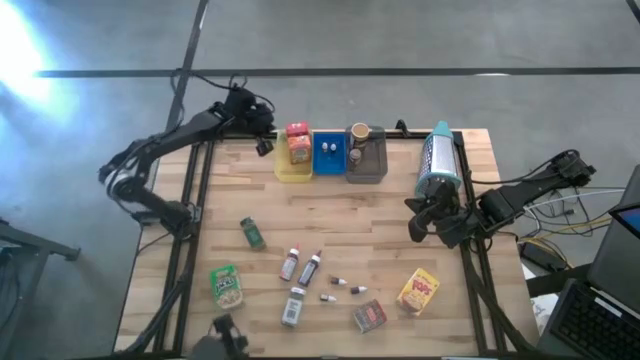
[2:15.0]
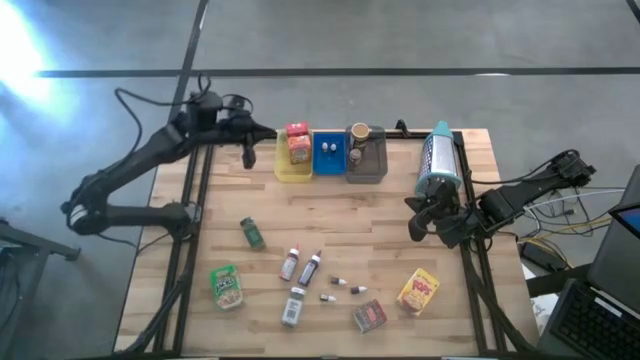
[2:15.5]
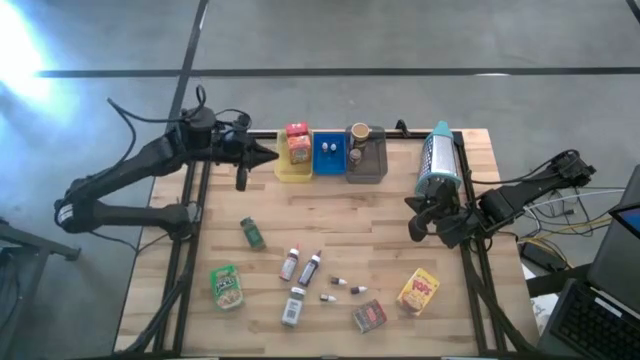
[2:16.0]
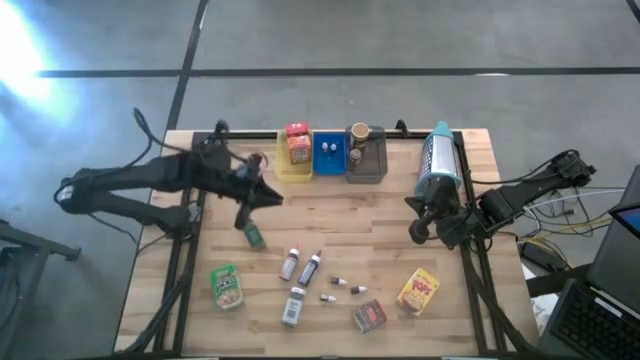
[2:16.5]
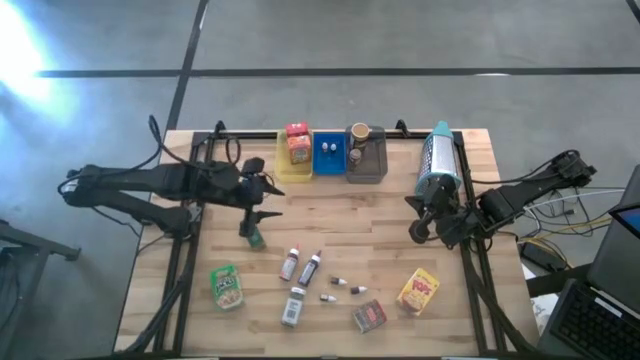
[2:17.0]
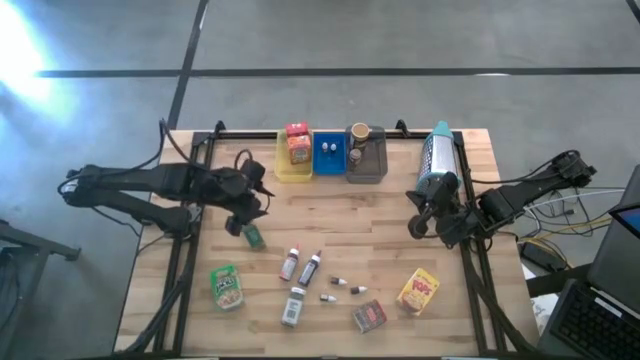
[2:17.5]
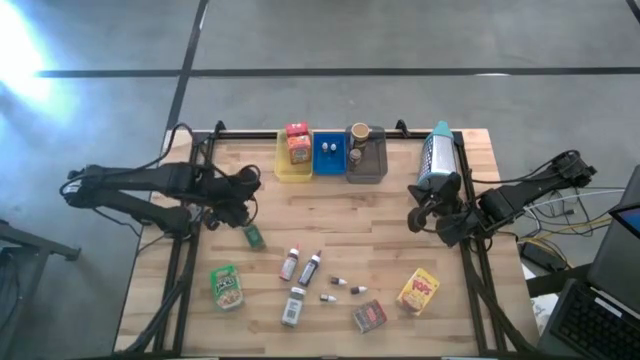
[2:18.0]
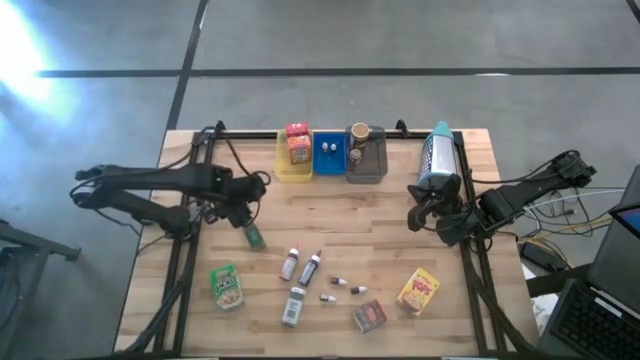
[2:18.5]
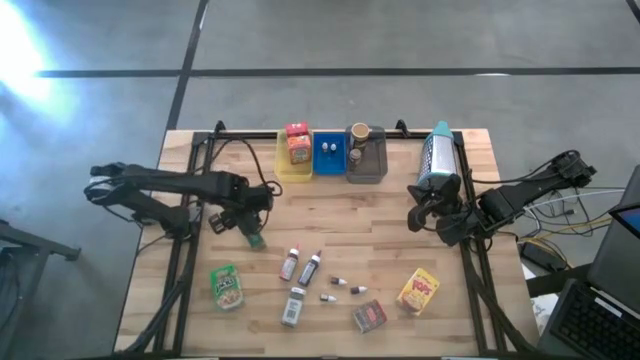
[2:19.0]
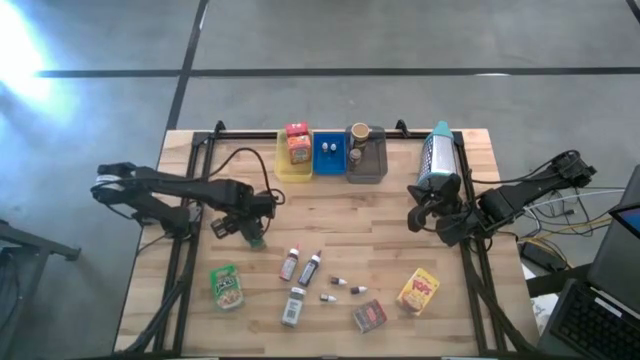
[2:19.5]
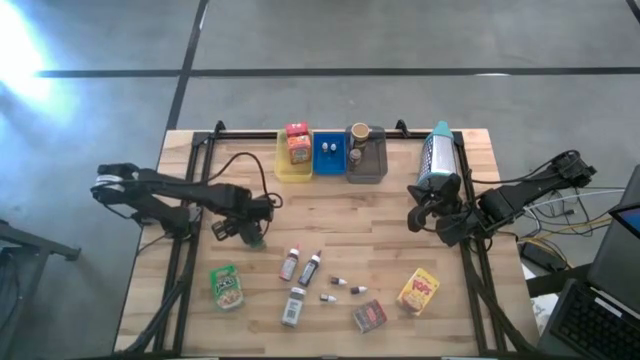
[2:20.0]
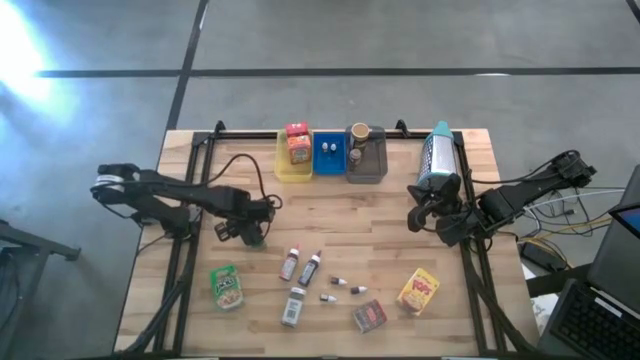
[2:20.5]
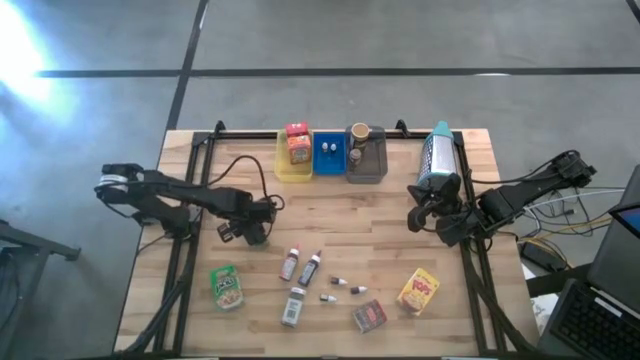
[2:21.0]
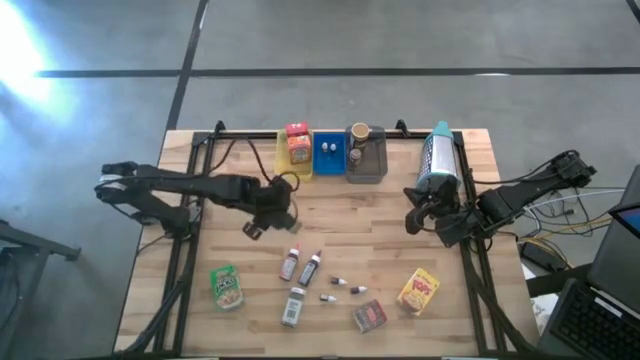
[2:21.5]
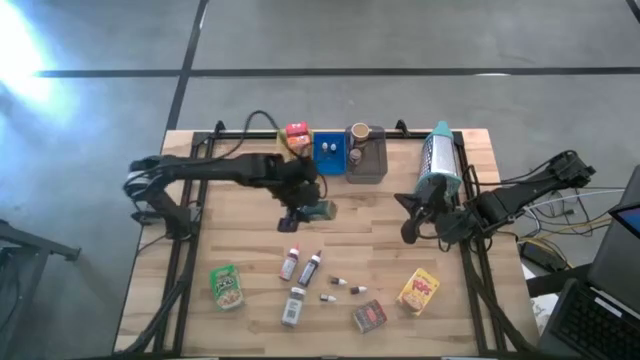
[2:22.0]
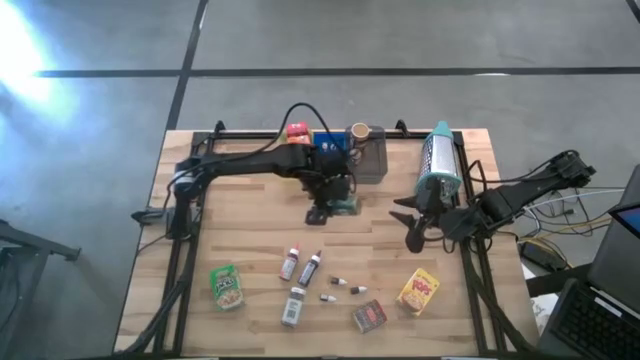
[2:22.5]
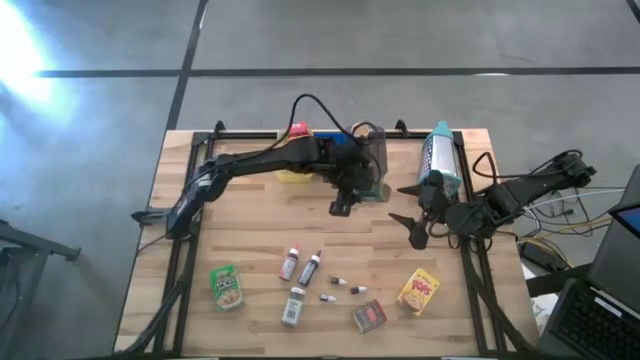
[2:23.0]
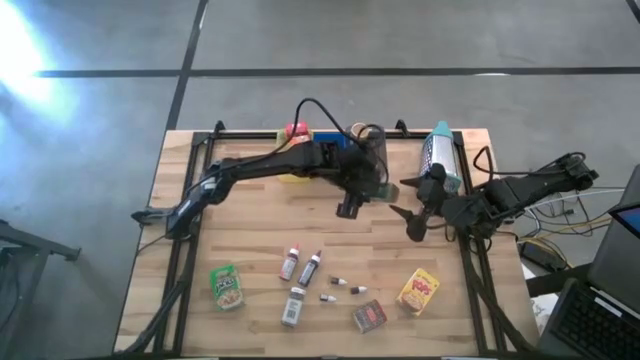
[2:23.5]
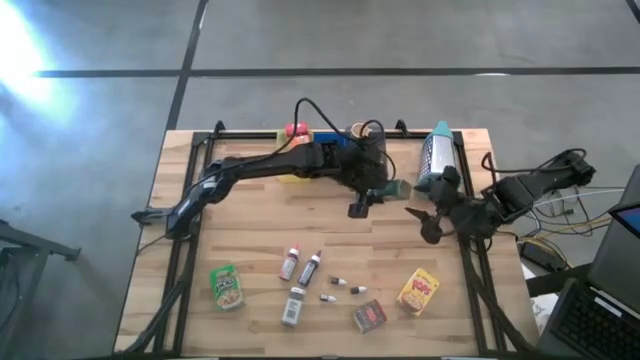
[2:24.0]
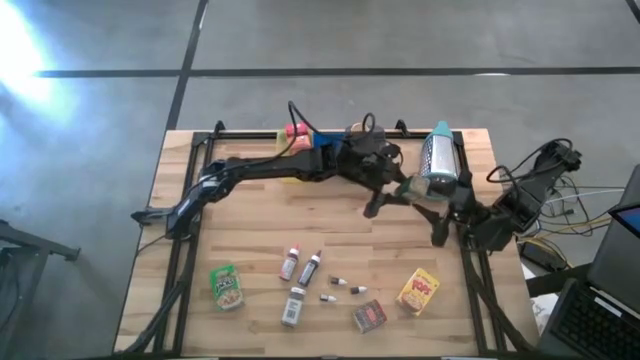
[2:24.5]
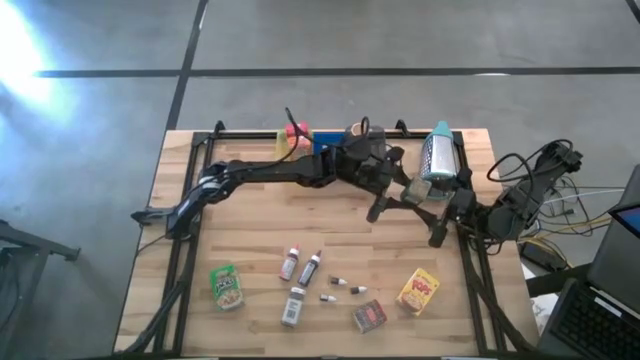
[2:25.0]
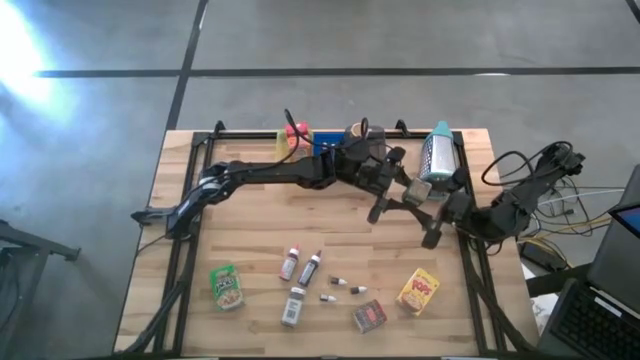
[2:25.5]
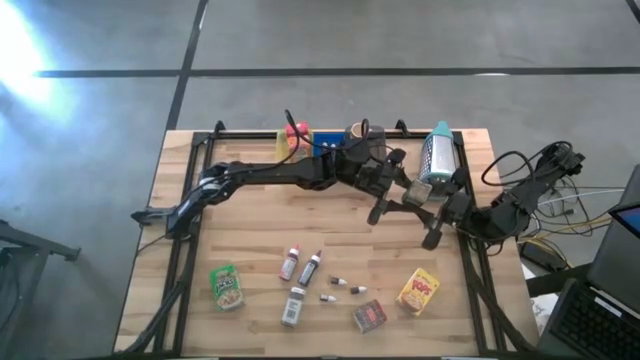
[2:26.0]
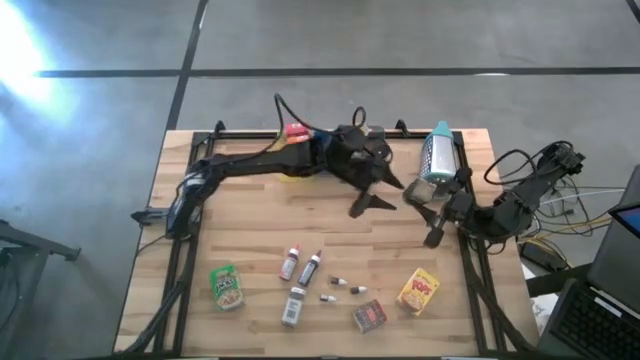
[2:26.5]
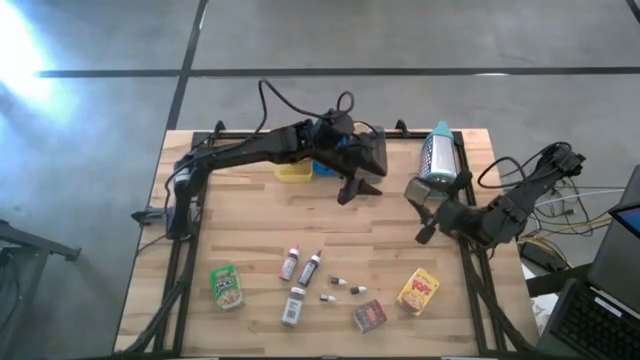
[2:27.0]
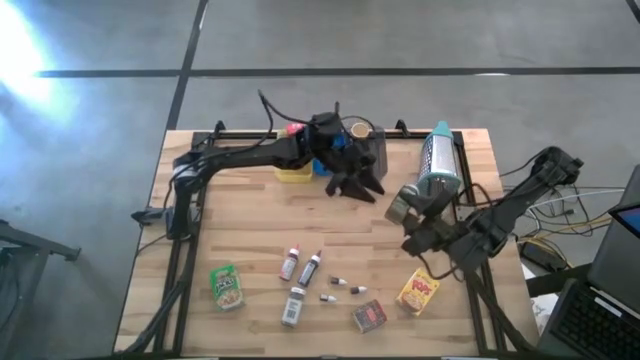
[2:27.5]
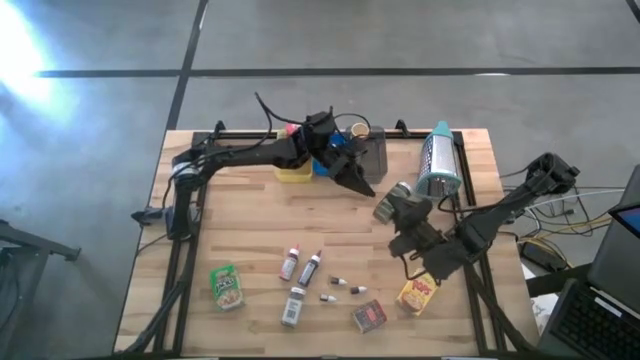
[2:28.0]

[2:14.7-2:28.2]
Task: Pick & Place Kitchen Items
Put the green seasoning bottle into the black bin

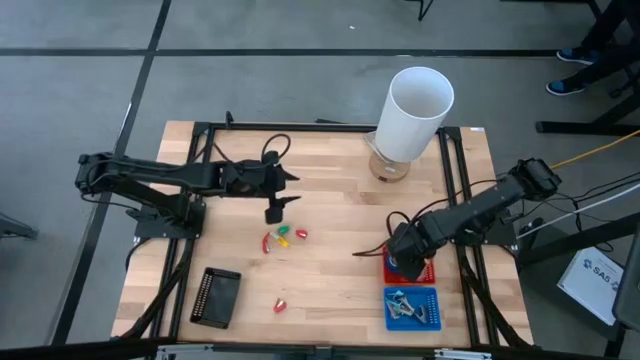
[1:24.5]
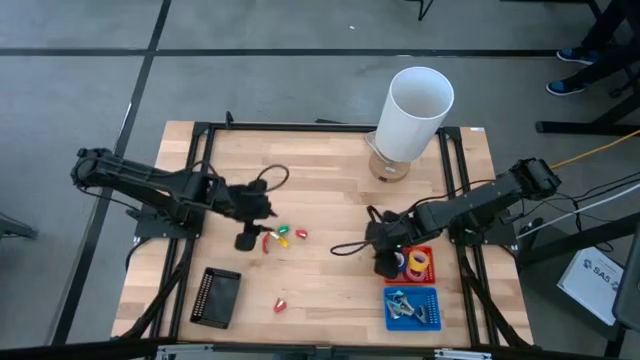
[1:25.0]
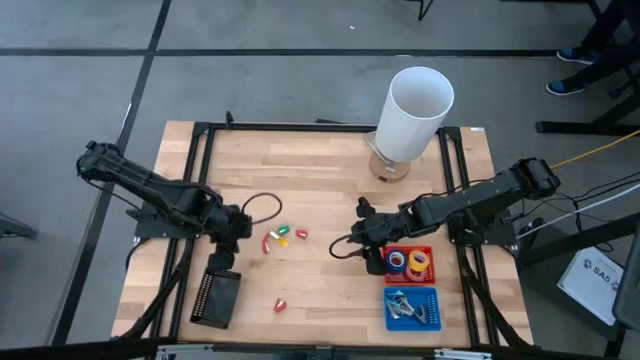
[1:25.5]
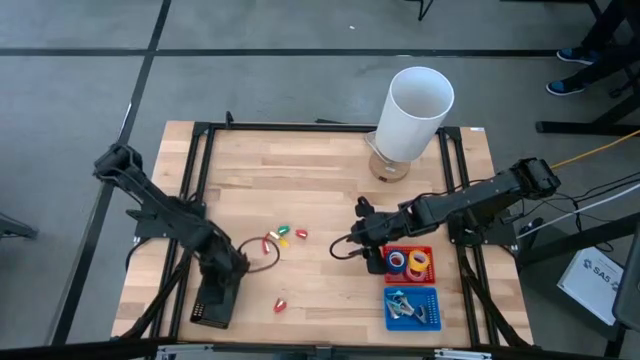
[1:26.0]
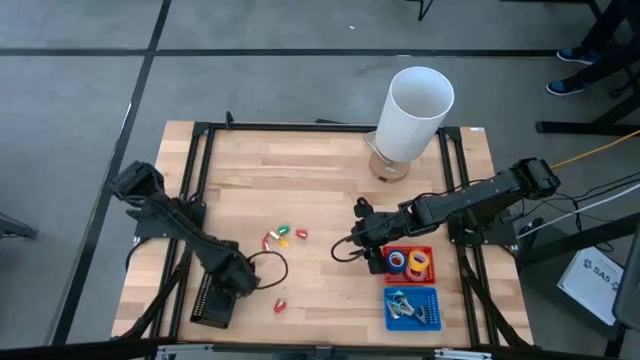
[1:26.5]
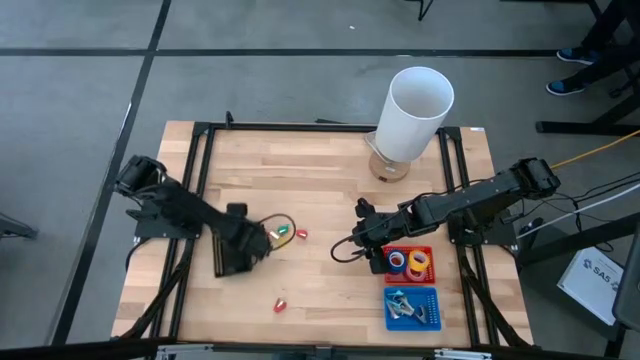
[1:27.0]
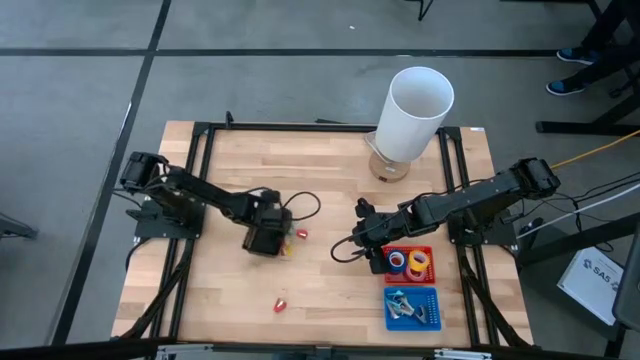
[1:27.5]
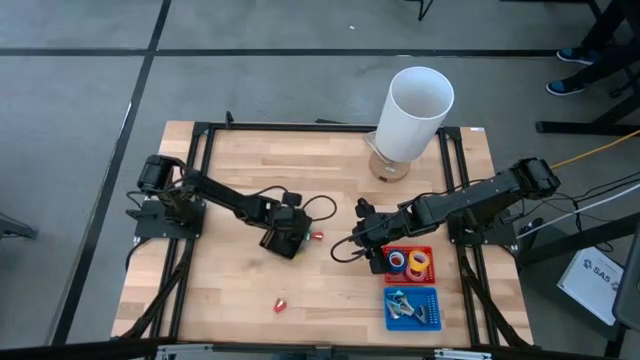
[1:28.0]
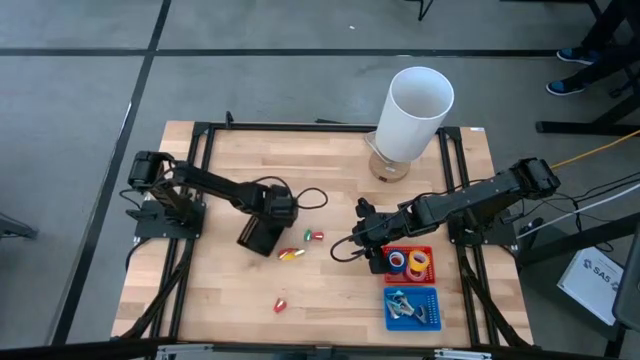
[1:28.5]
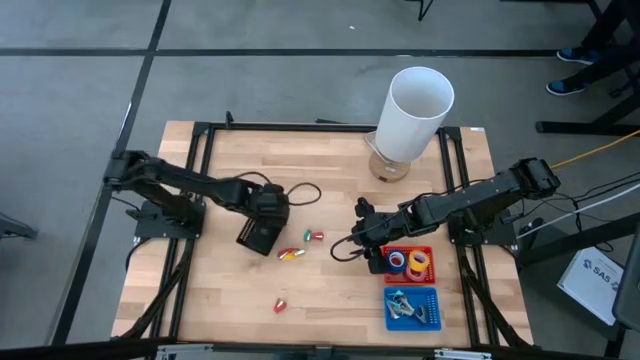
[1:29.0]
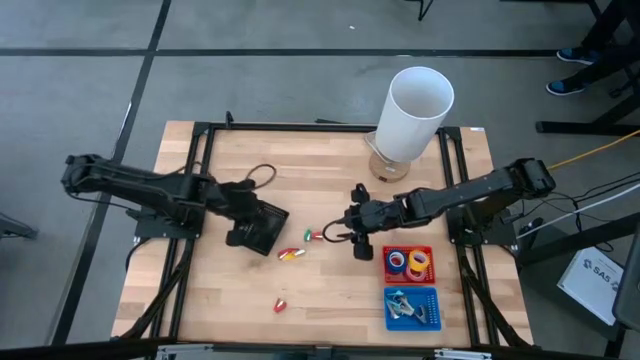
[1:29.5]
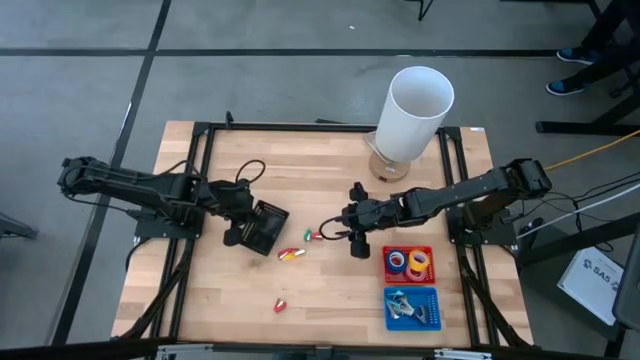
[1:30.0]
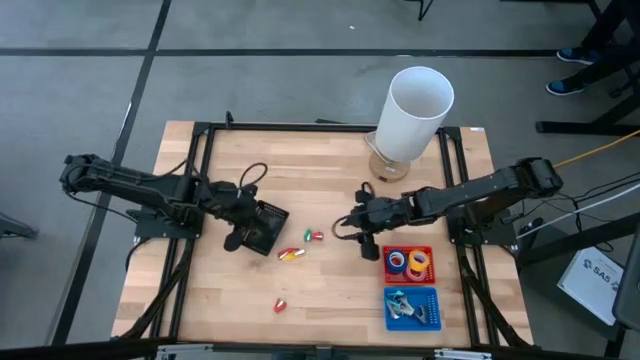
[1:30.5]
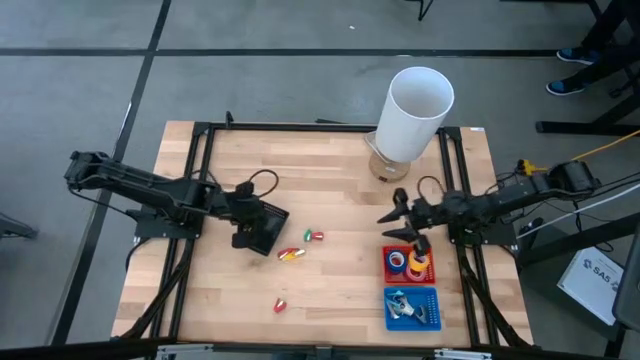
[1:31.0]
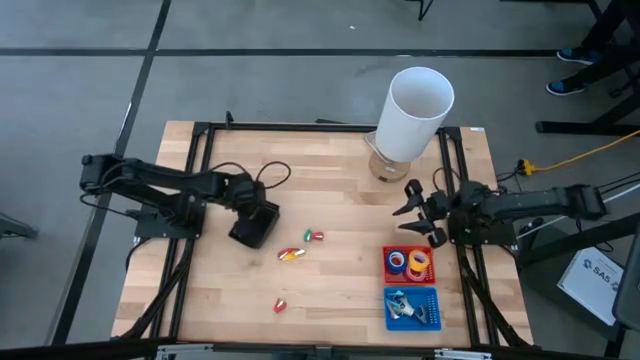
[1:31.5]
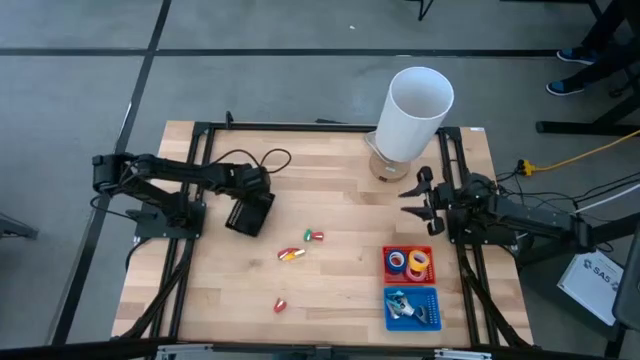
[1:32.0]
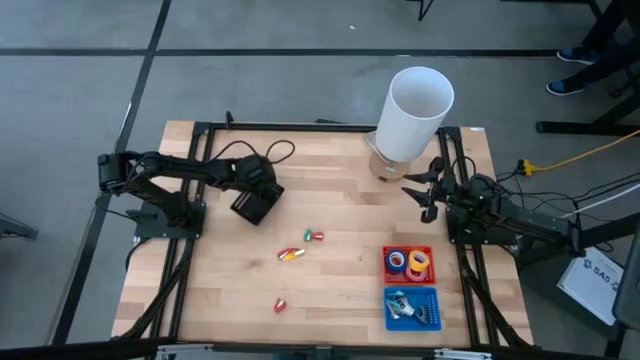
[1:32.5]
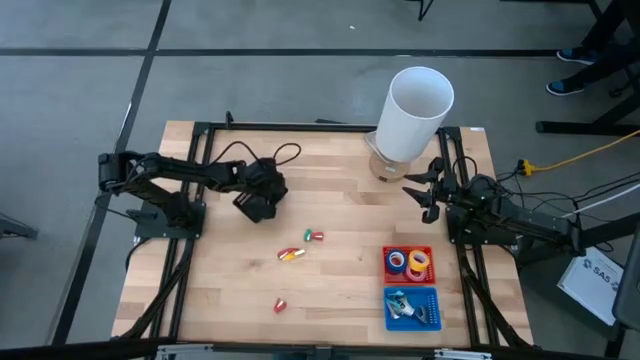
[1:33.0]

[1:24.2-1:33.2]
Task: Pick and place Stapler, Stapler remover, tape
Prepare the black basket
